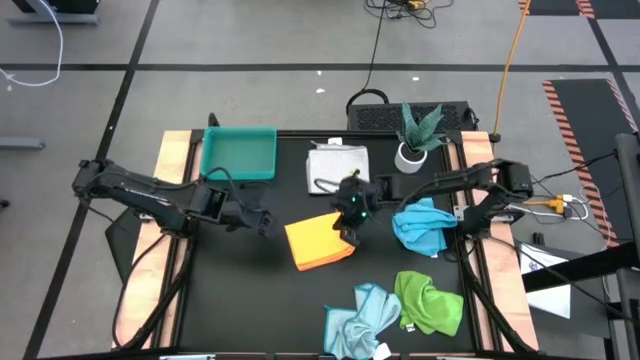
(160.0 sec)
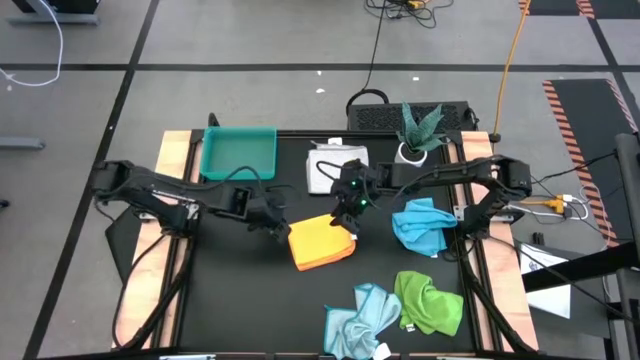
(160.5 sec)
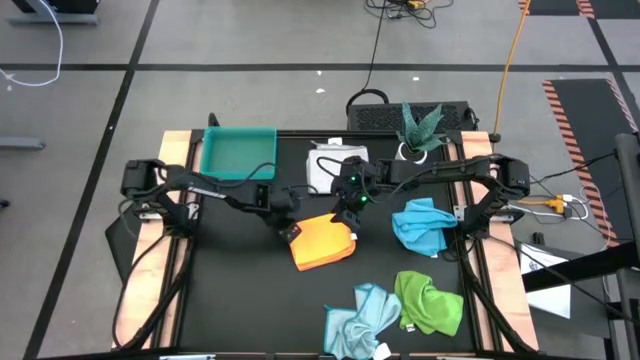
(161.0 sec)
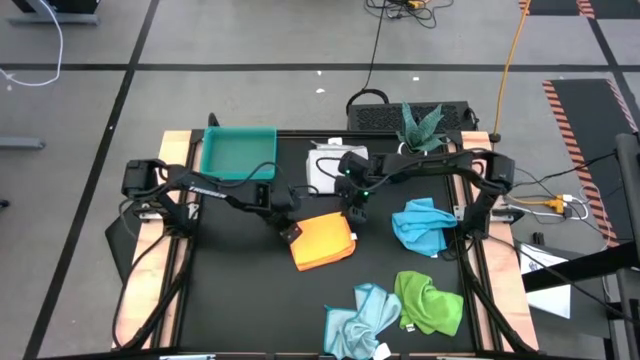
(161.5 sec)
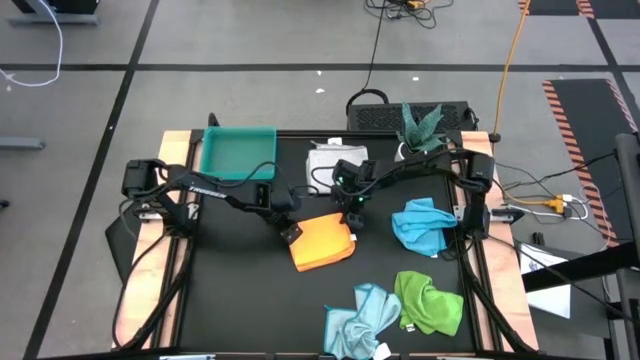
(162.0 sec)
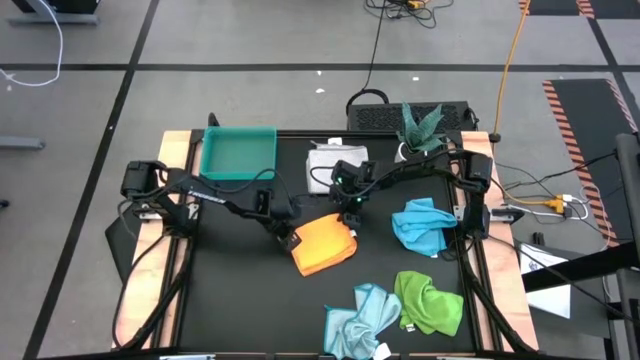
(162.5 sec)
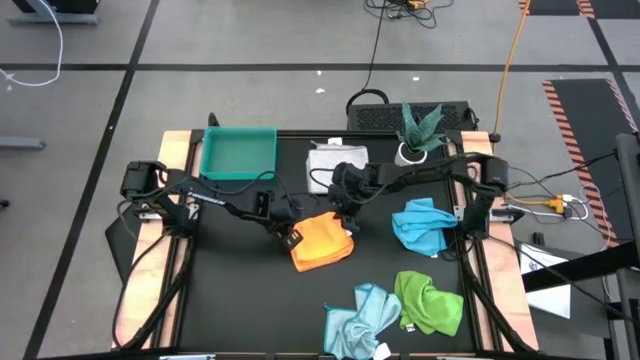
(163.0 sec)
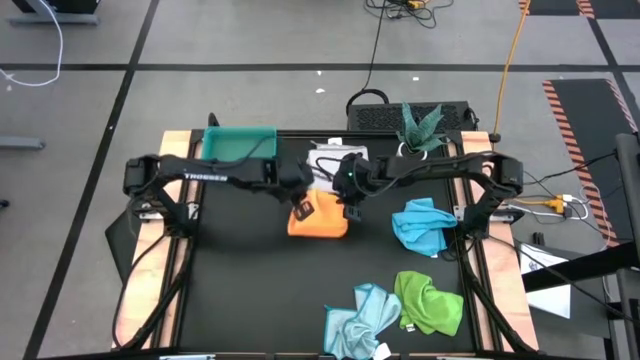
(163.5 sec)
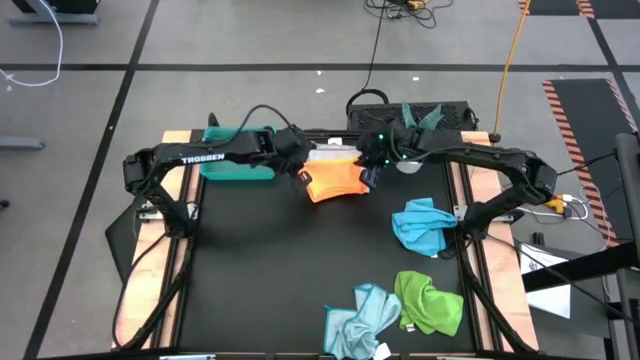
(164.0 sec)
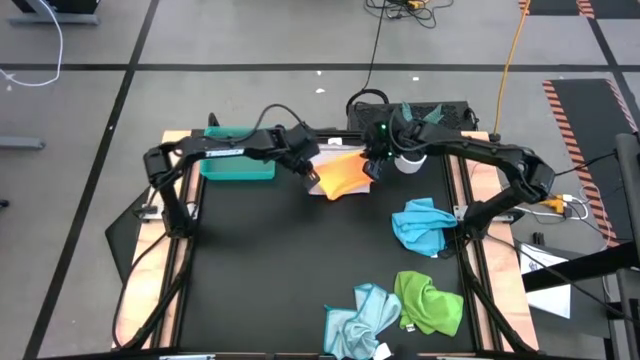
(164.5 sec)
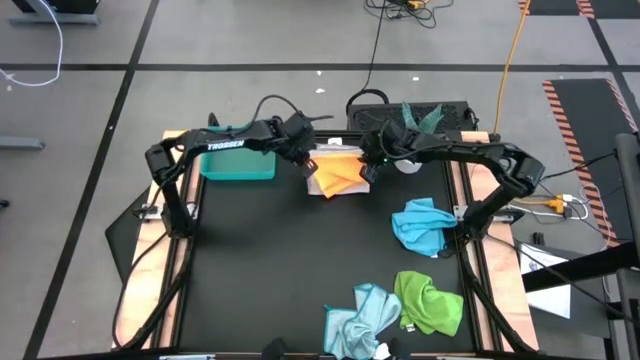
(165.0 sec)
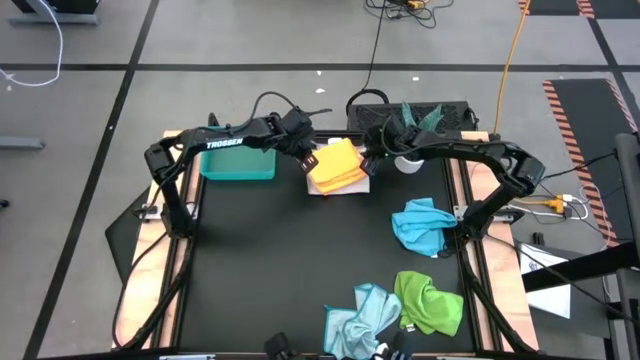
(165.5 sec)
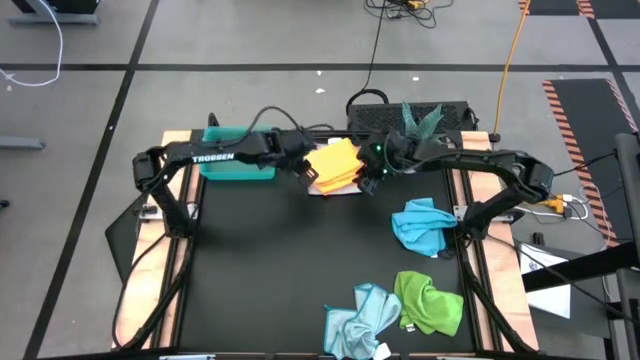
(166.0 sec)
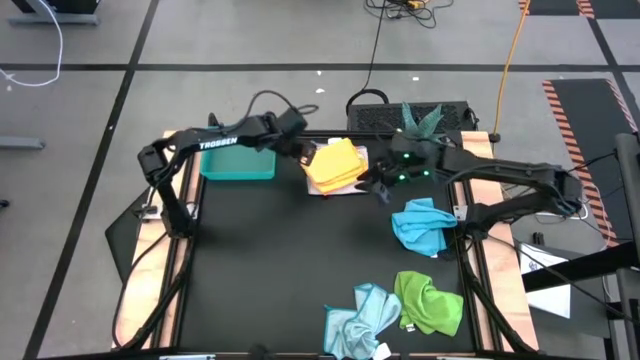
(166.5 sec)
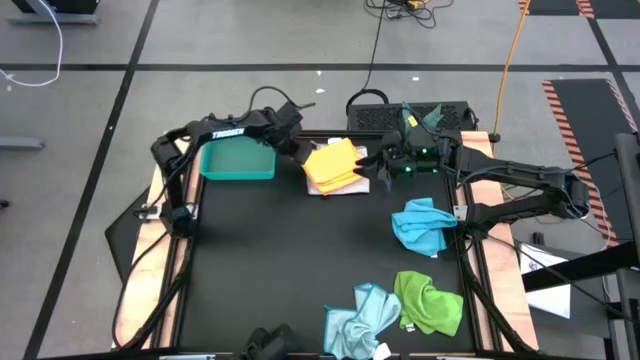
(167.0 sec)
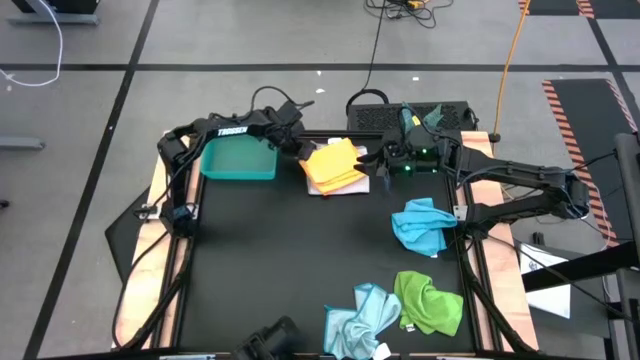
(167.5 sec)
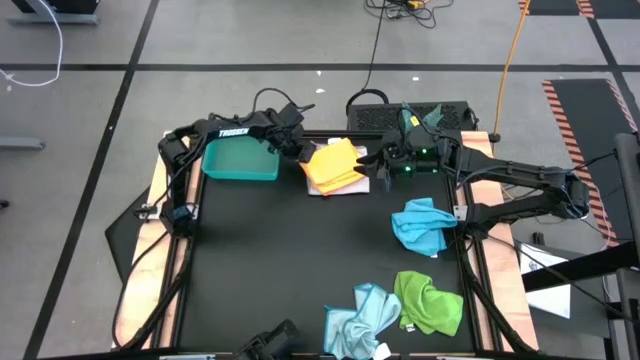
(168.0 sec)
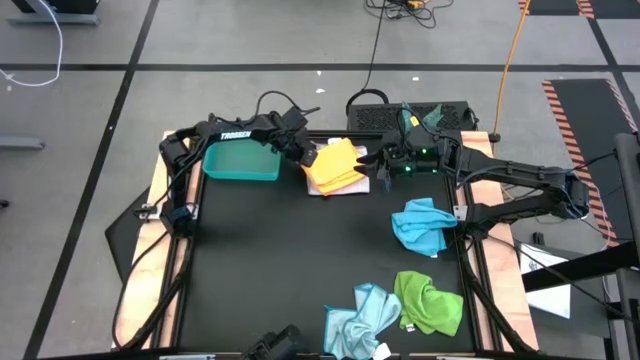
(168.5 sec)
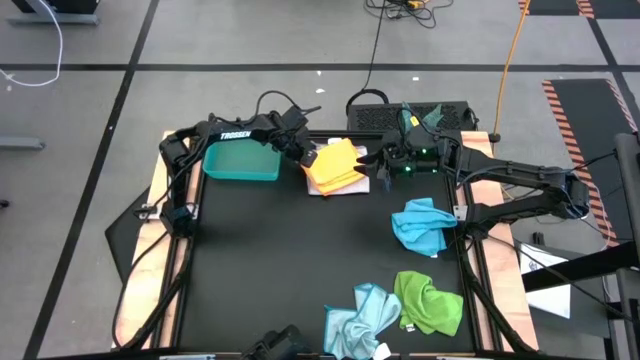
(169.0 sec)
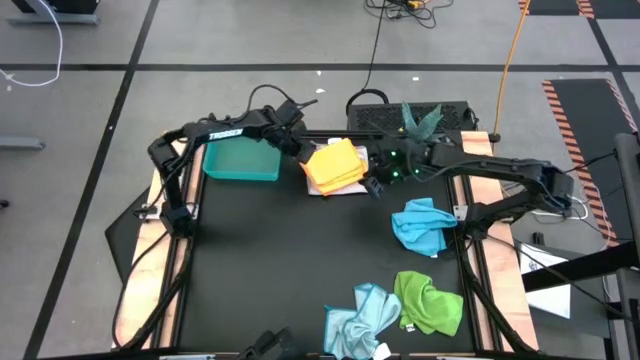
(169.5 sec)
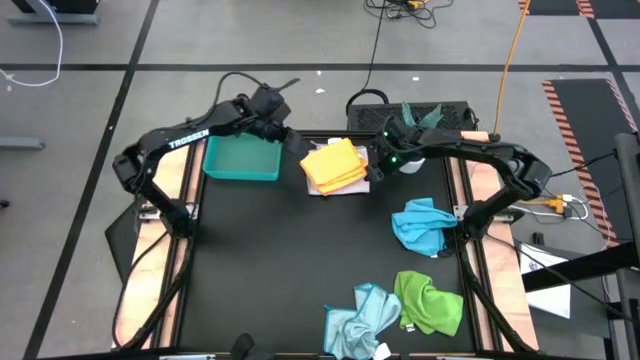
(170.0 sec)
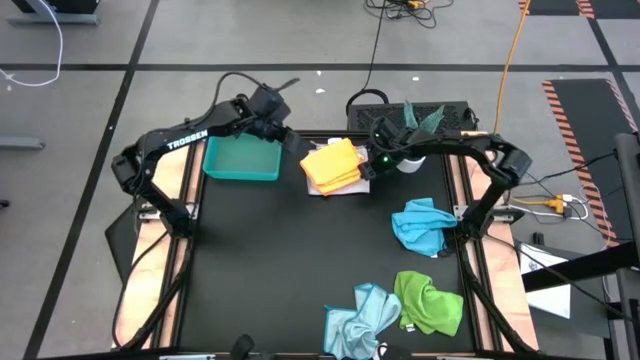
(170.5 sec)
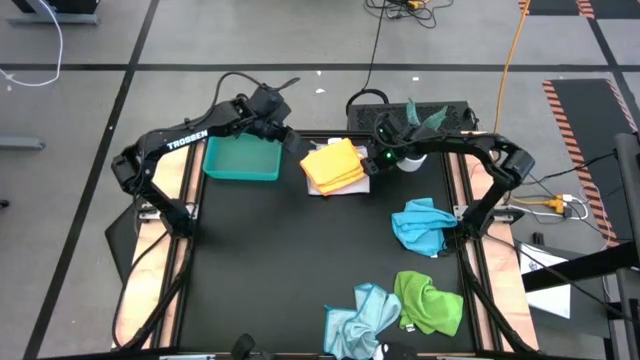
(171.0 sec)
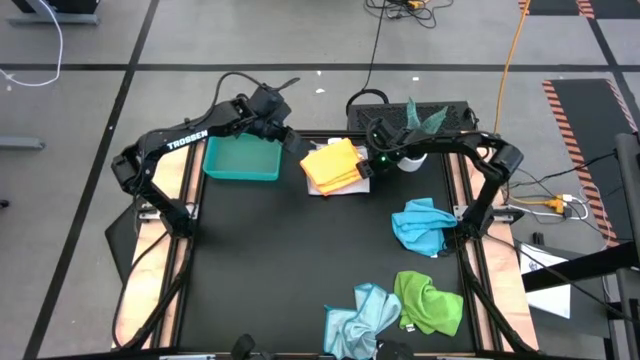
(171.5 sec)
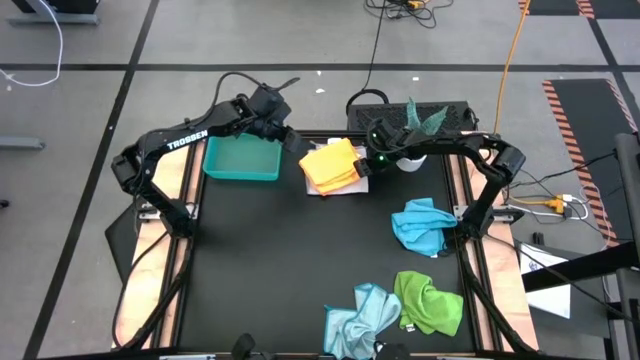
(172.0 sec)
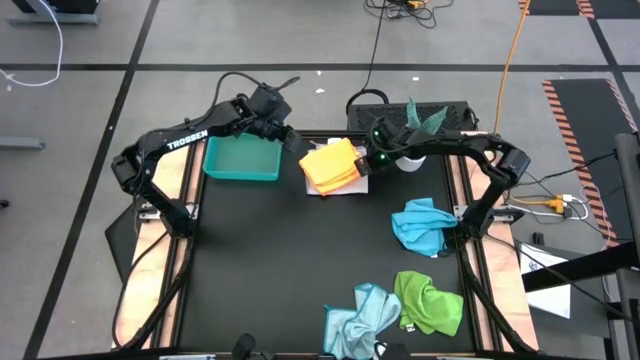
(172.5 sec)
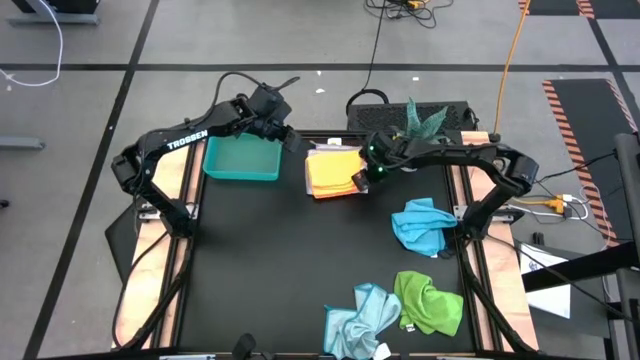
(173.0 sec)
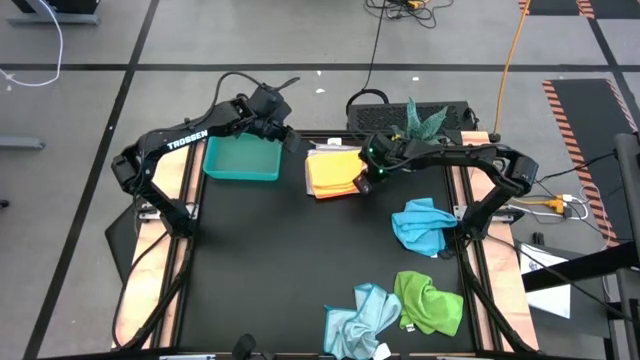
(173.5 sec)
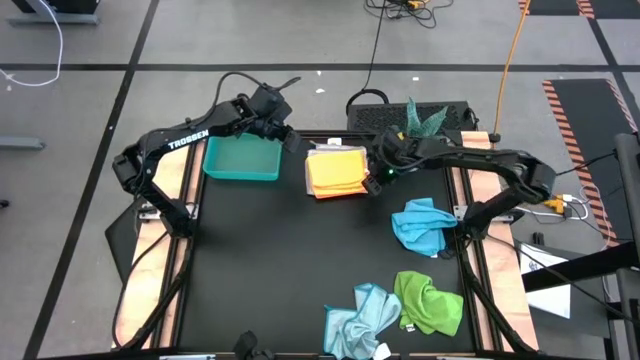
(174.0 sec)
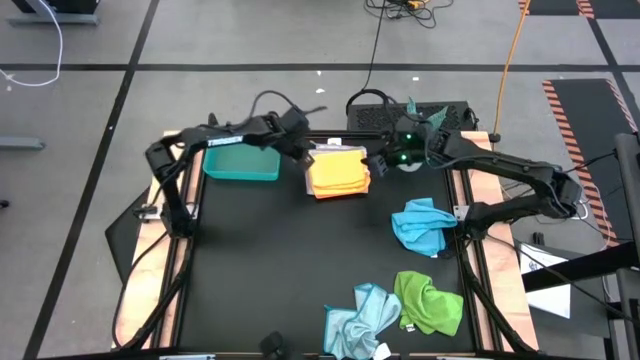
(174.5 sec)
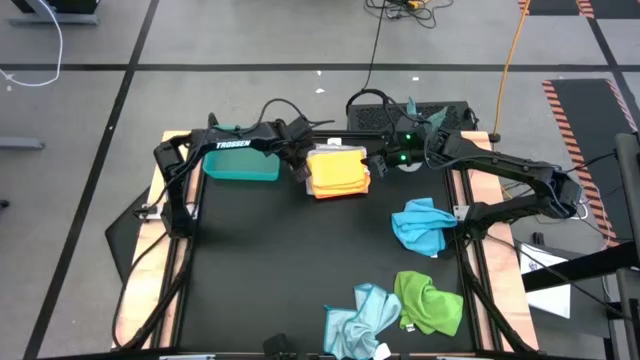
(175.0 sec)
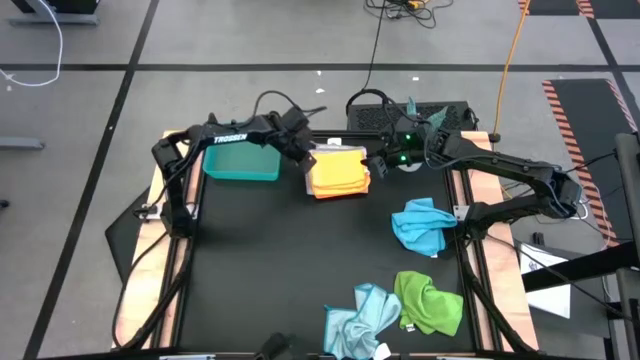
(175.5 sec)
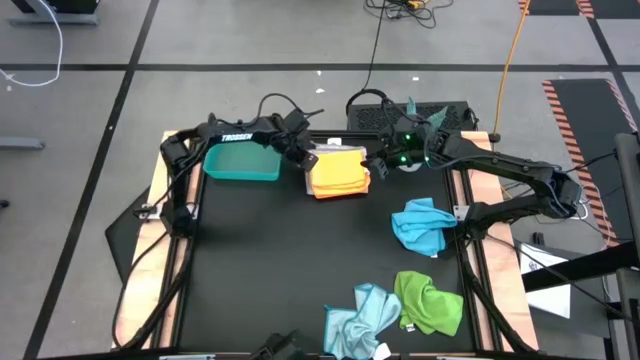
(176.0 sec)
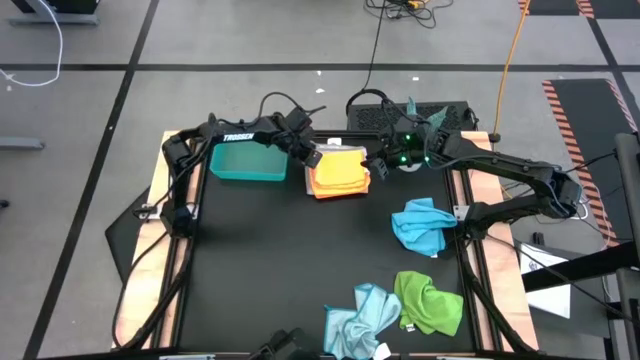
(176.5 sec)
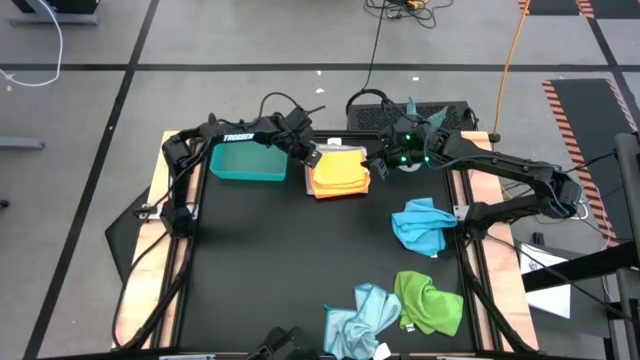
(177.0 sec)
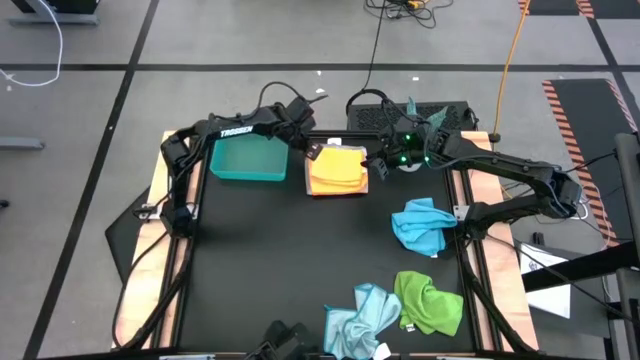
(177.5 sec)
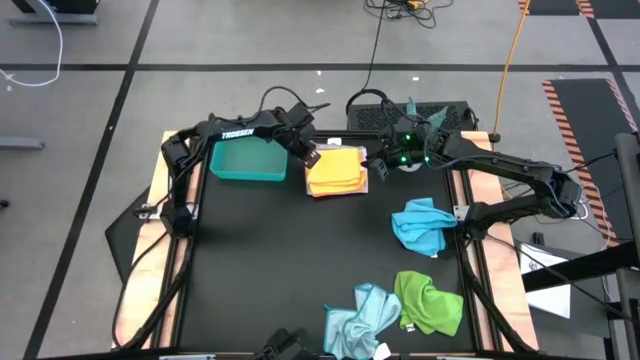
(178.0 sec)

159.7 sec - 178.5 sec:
Task: Fold microfiber towels
Stack the folded orange microfiber towel on top of the folded gray microfiber towel

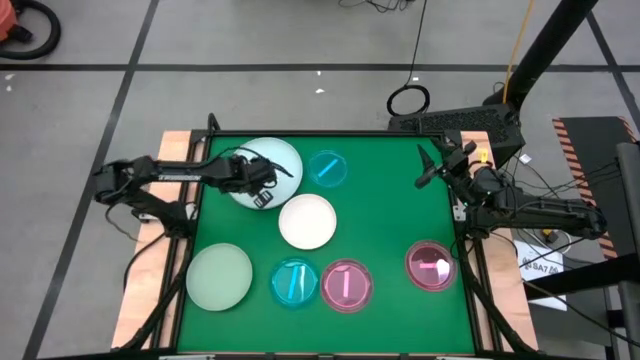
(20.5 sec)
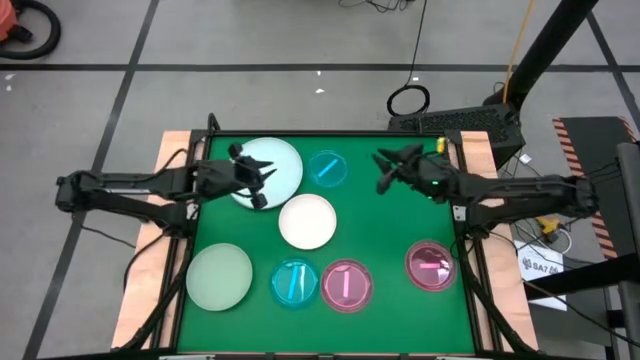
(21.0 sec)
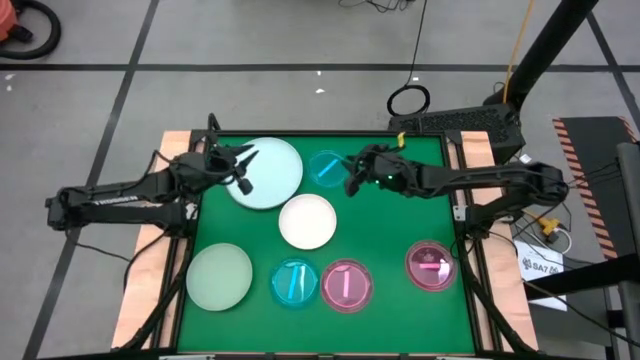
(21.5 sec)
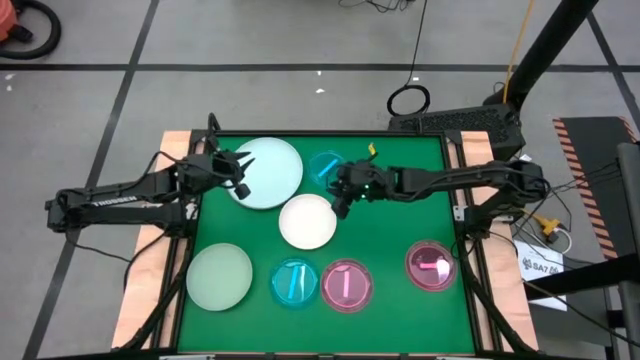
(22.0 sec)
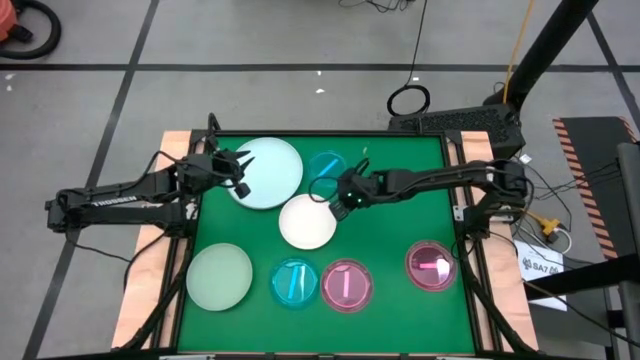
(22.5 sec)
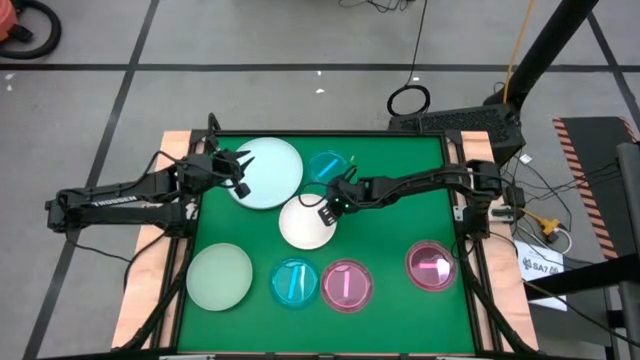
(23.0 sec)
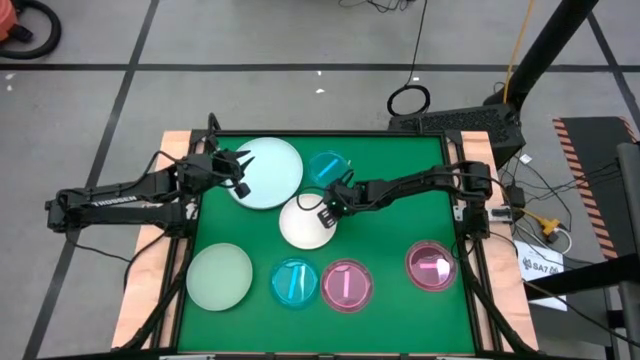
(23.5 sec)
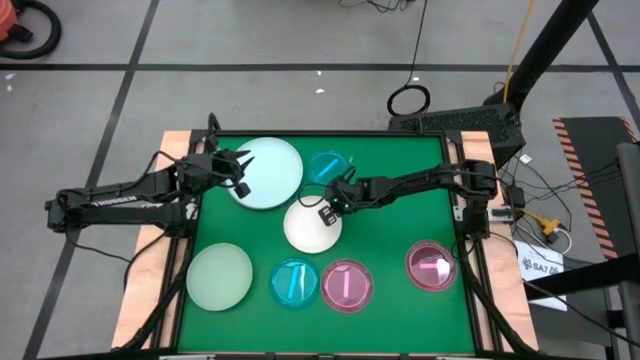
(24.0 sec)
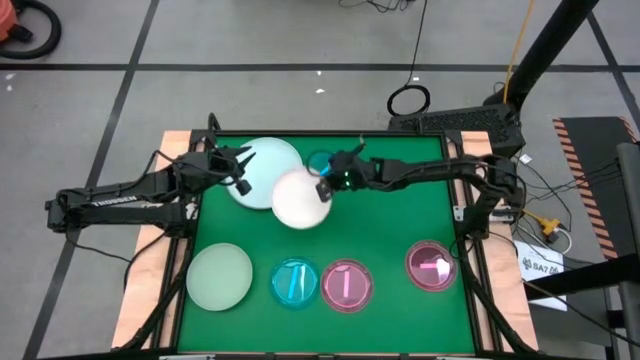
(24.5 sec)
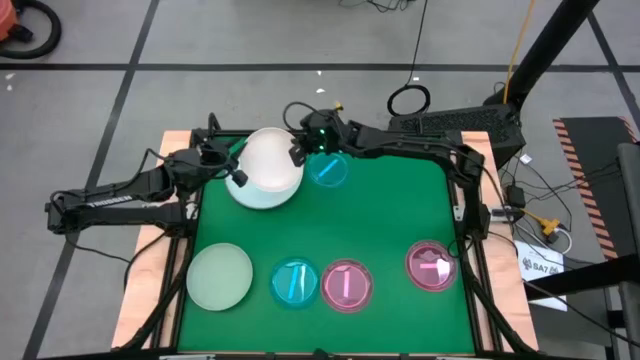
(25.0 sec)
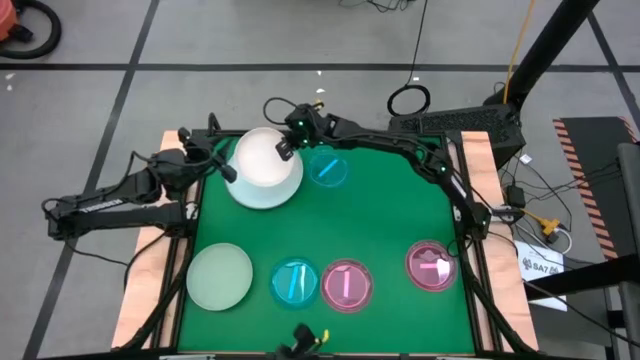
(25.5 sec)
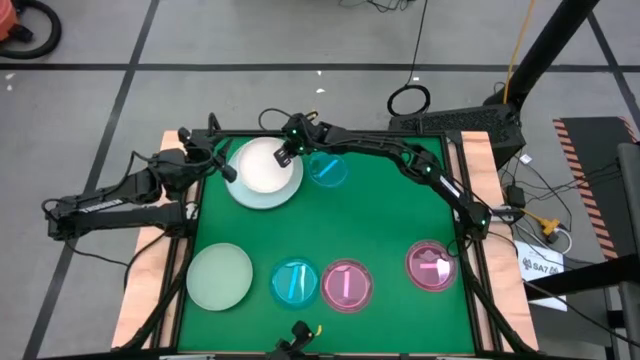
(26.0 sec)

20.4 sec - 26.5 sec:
Task: Stack plastic plates
Stack the white plate on top of the blue plate
